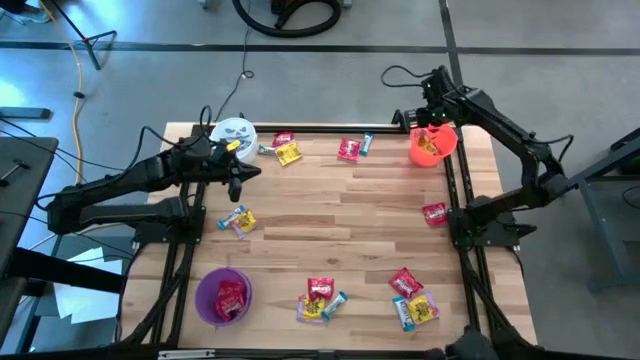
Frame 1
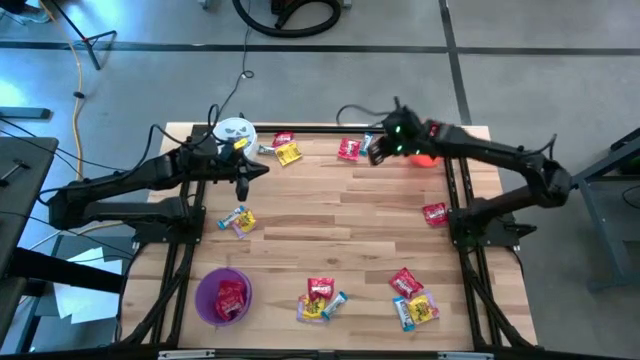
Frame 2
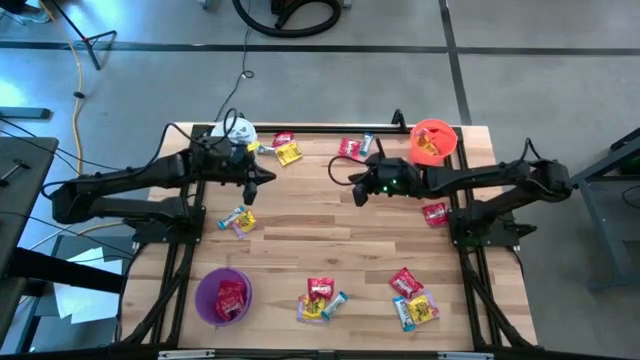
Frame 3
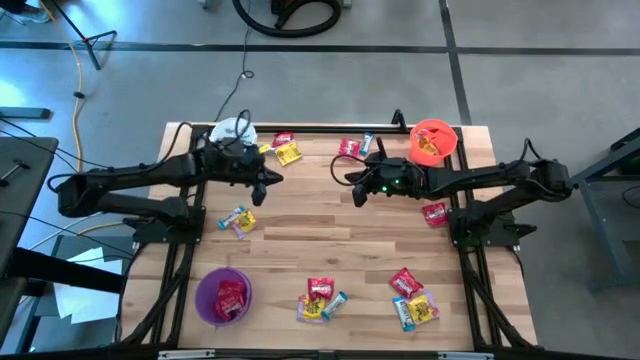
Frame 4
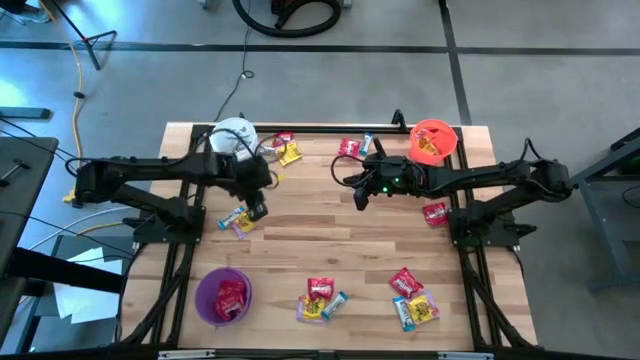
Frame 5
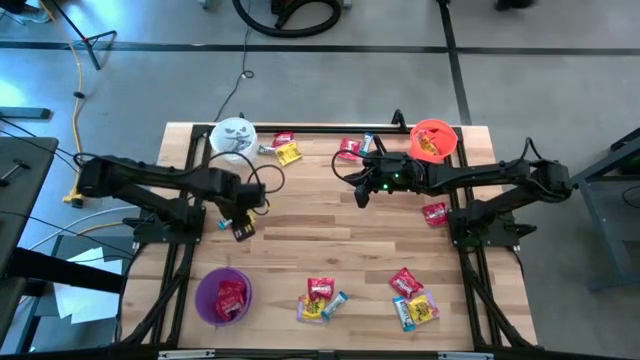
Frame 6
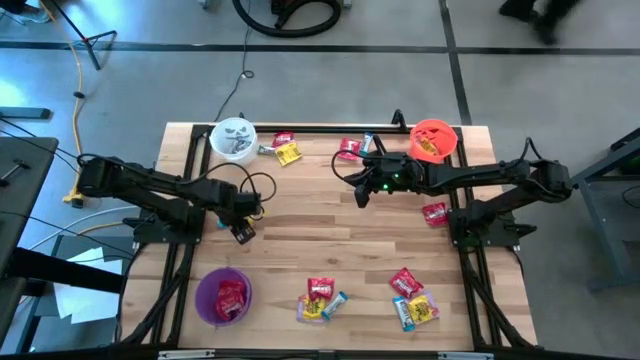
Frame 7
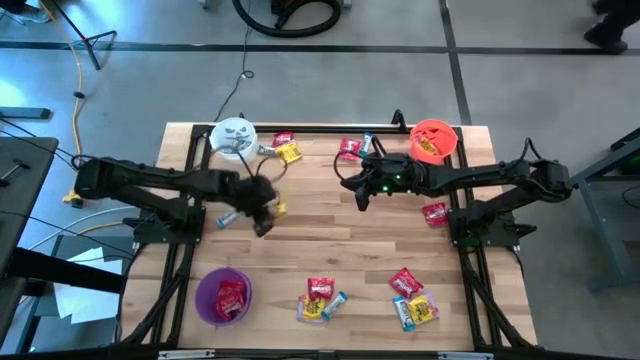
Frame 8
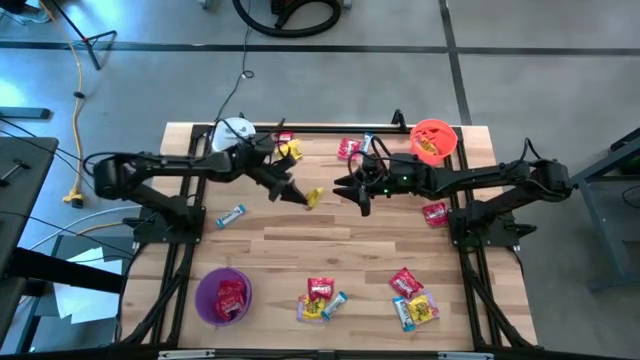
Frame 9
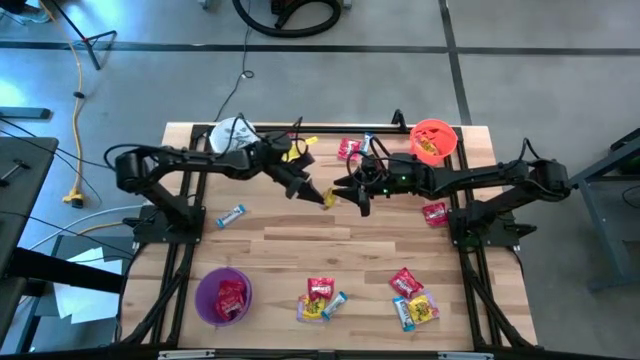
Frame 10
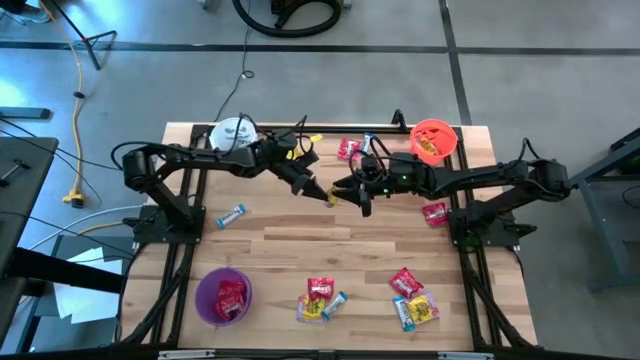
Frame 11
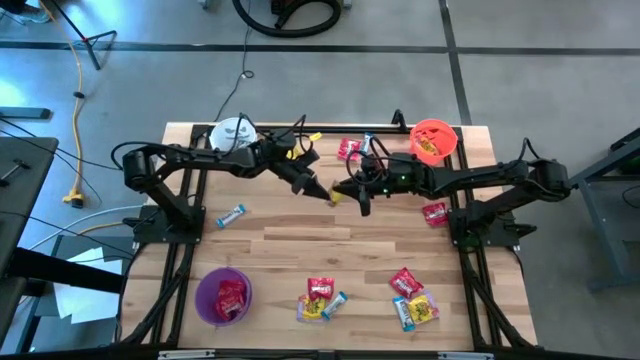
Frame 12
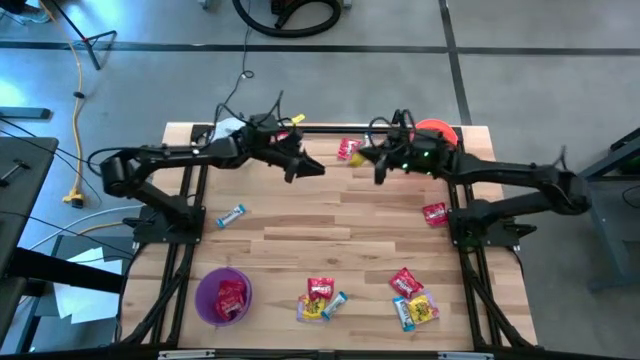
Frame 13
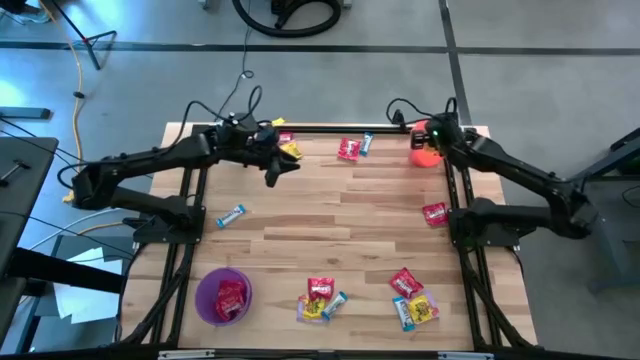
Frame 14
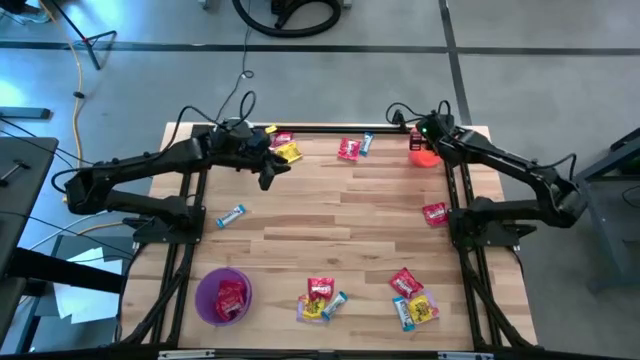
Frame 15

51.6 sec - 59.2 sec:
Task: Sort candy
Put the yellow candy into the orange bucket

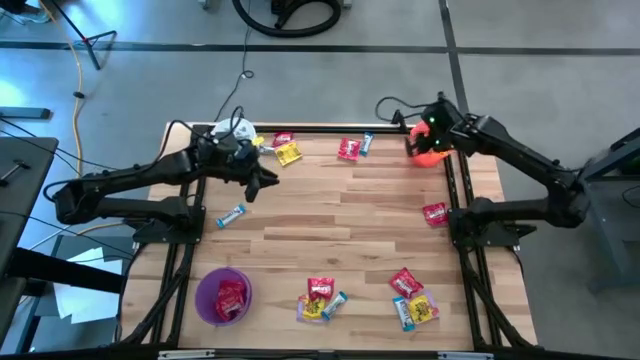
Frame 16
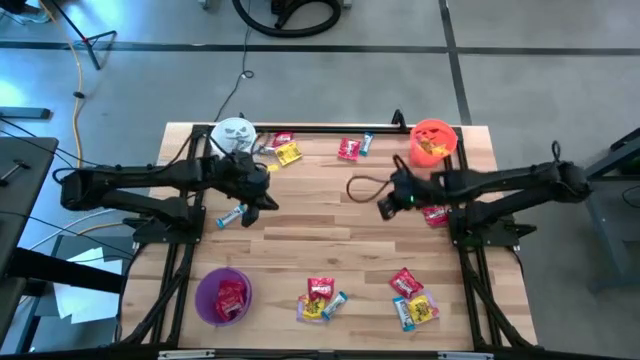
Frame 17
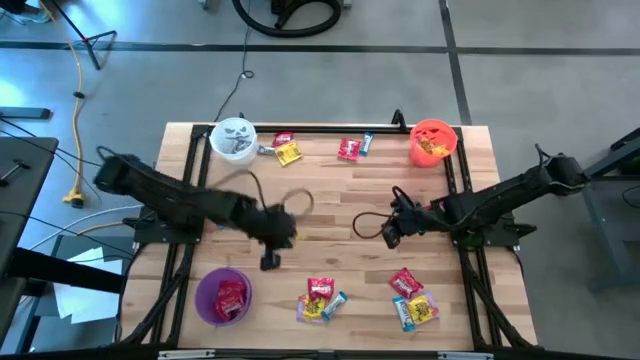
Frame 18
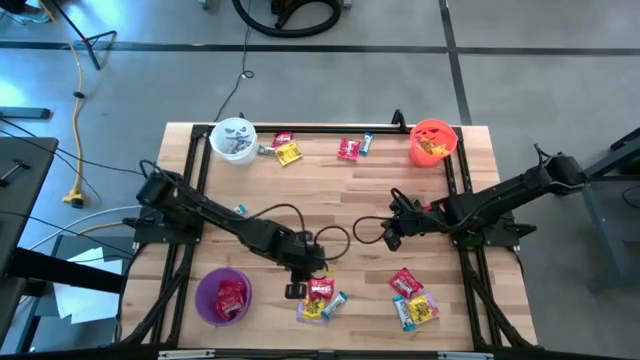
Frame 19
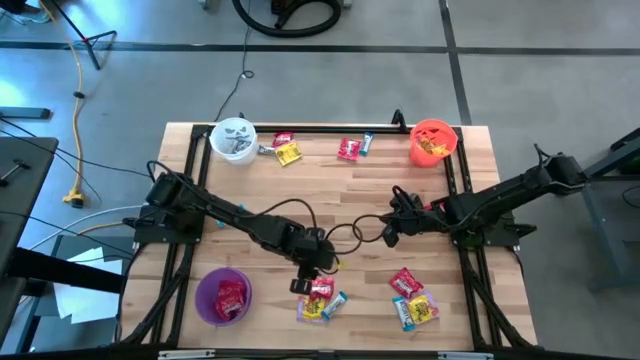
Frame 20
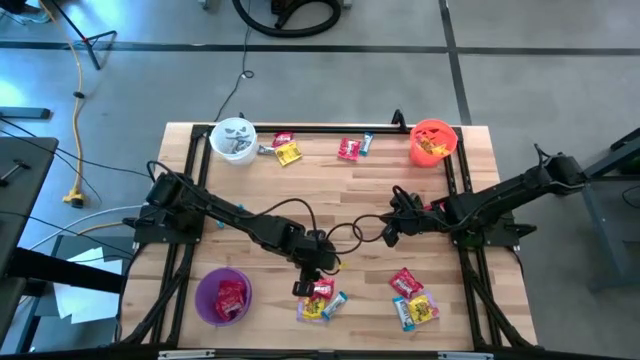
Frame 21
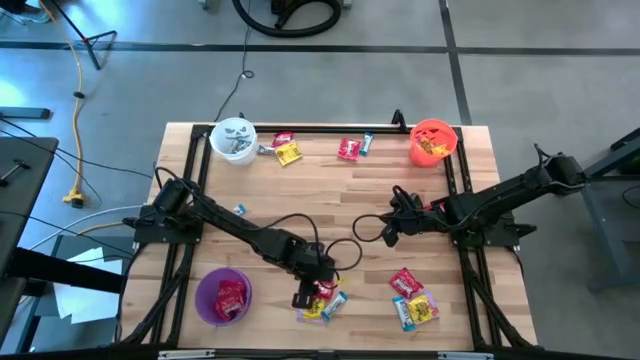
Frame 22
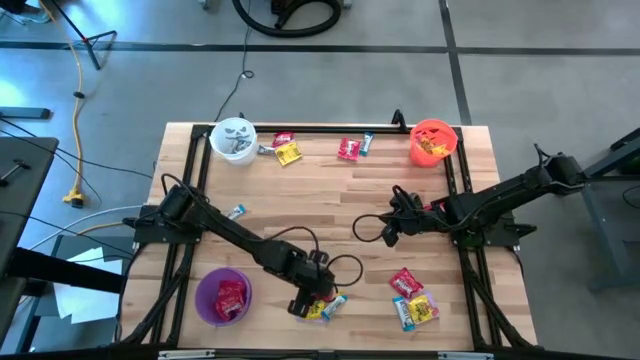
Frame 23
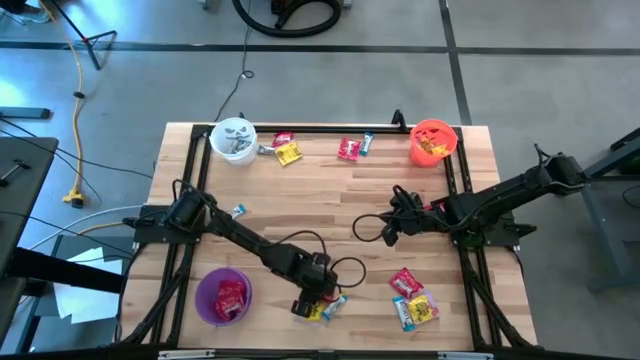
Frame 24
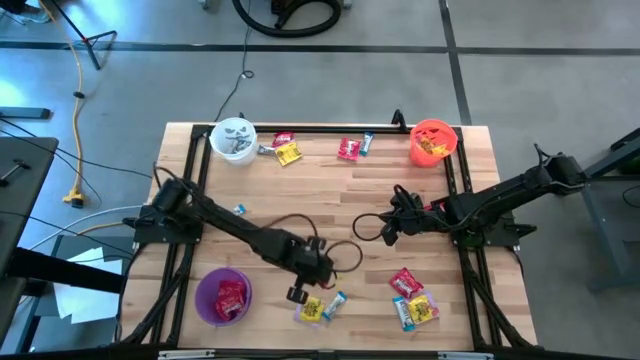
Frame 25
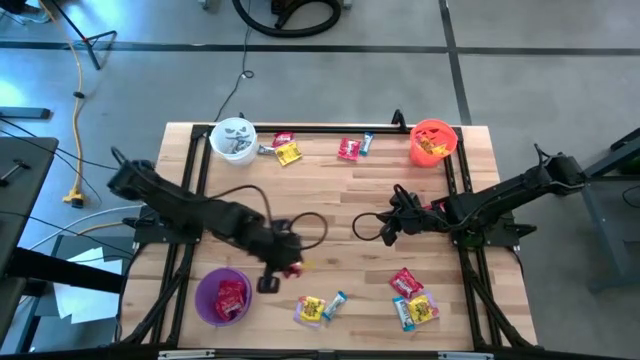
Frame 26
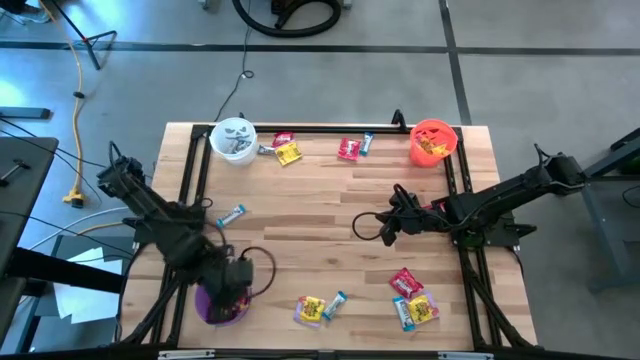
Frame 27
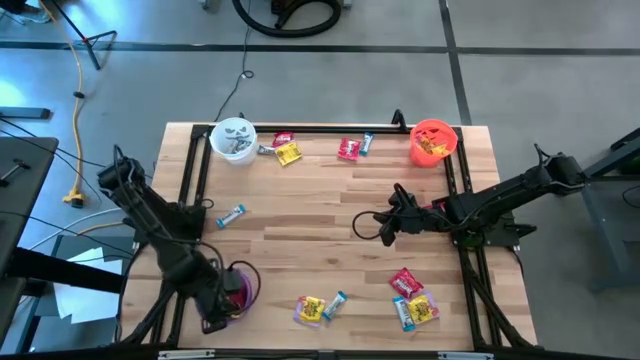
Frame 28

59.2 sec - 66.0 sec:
Put the red candy into the purple bucket

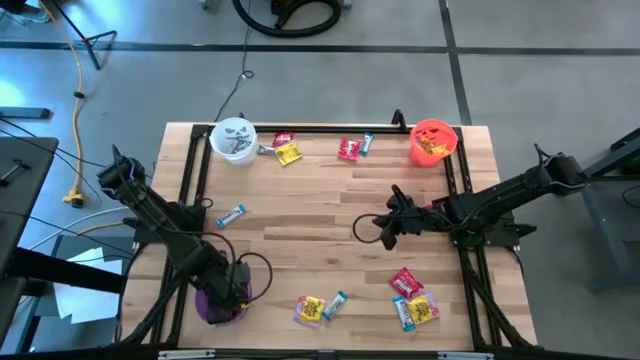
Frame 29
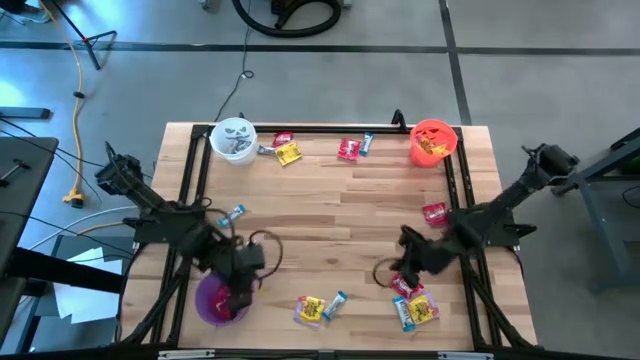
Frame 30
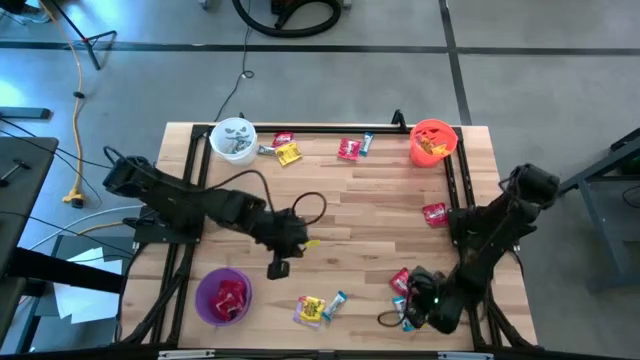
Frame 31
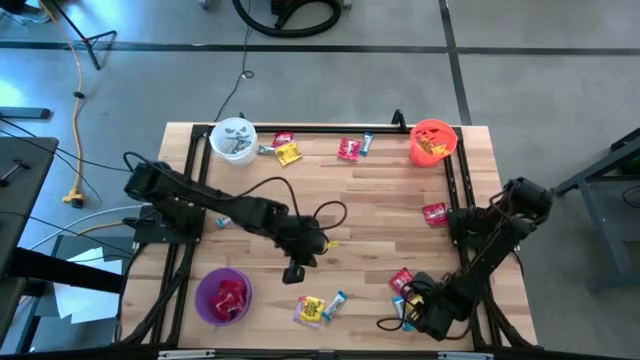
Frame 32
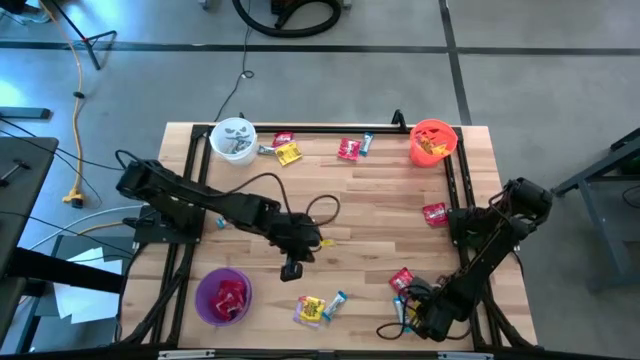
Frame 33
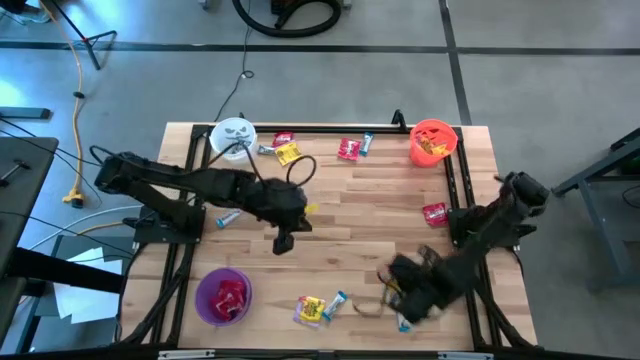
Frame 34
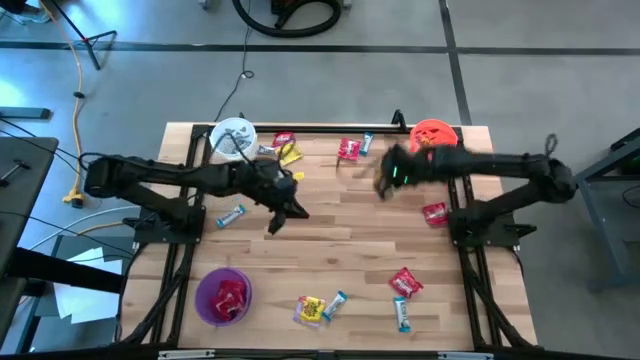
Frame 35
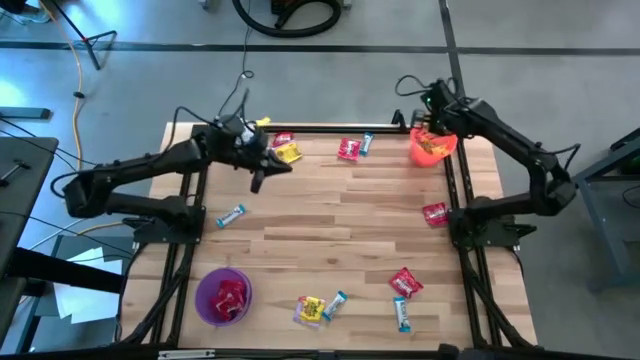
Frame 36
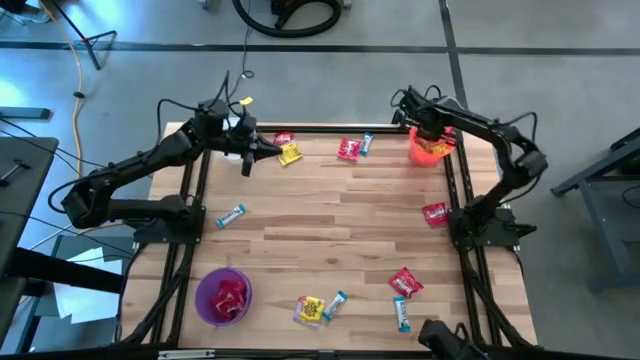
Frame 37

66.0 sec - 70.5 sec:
Put the yellow candy into the orange bucket

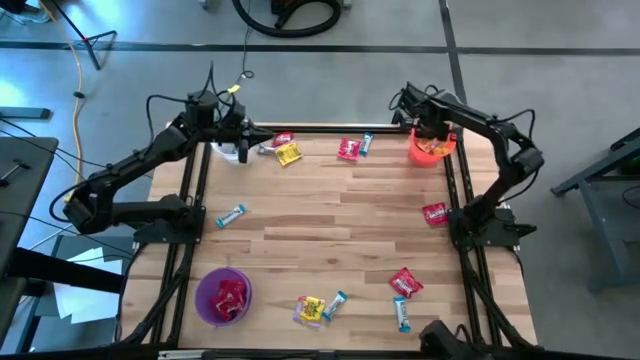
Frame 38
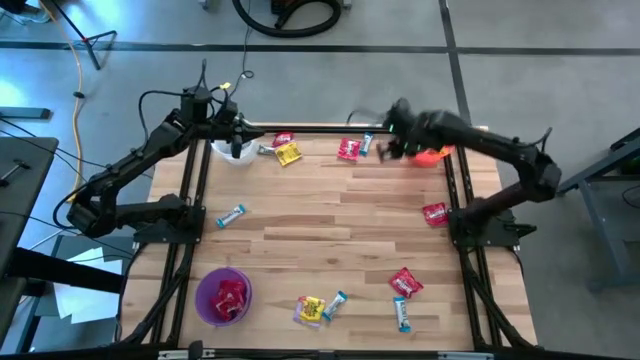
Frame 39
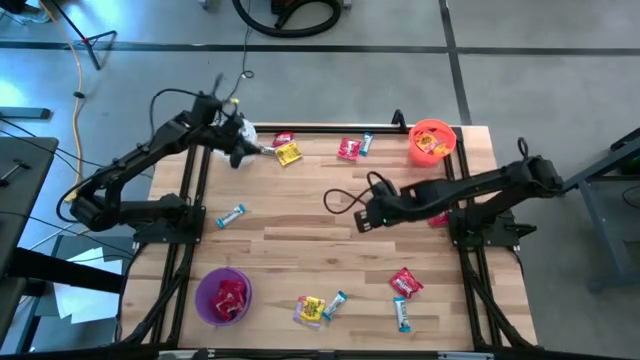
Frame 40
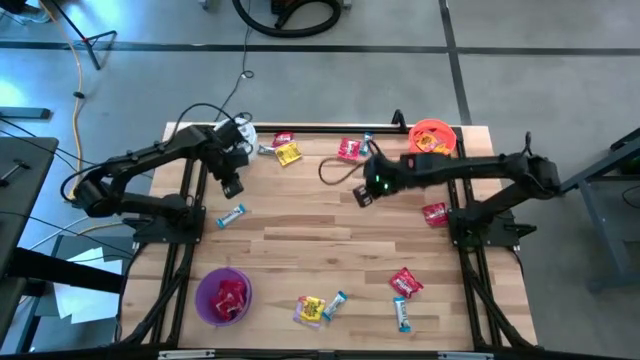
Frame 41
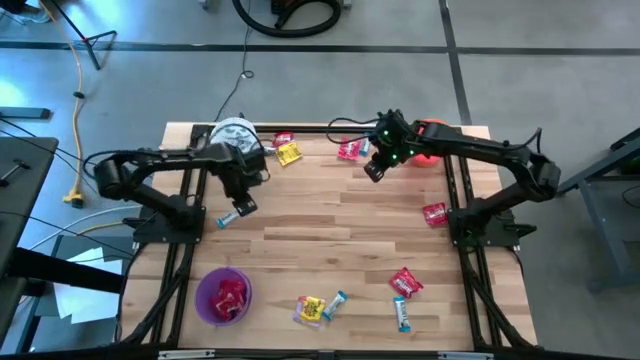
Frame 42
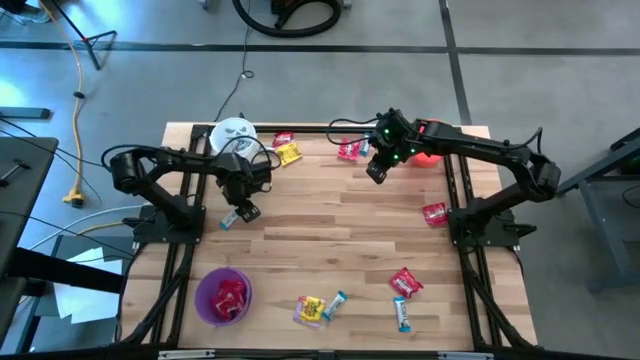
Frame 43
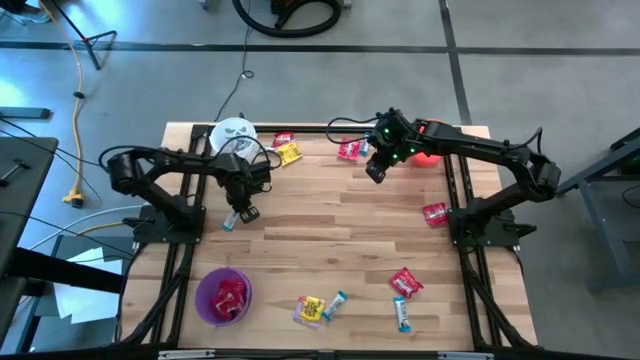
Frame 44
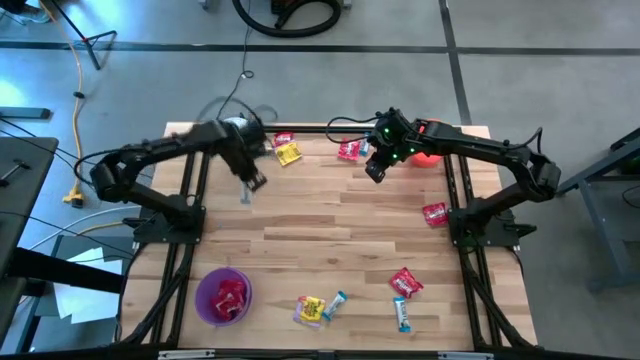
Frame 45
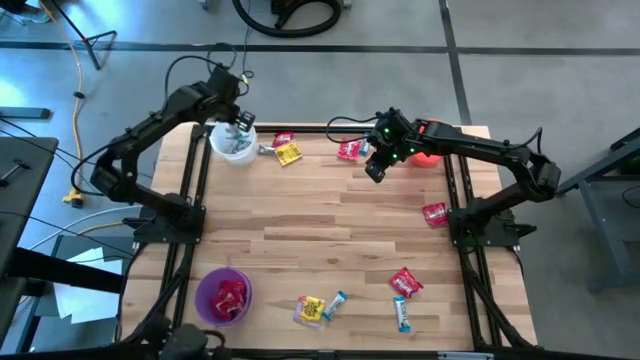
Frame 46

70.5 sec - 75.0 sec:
Put the white candy into the white bucket
